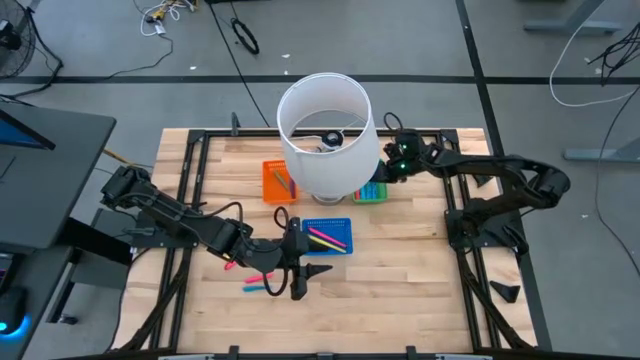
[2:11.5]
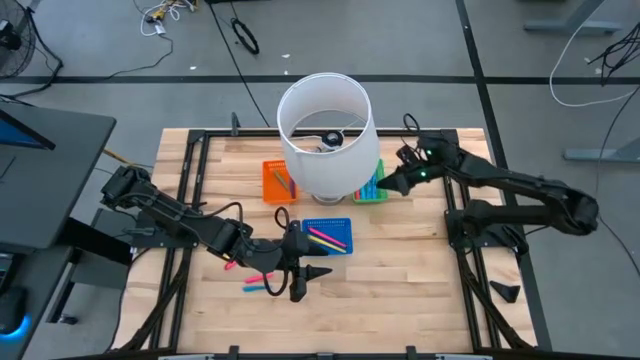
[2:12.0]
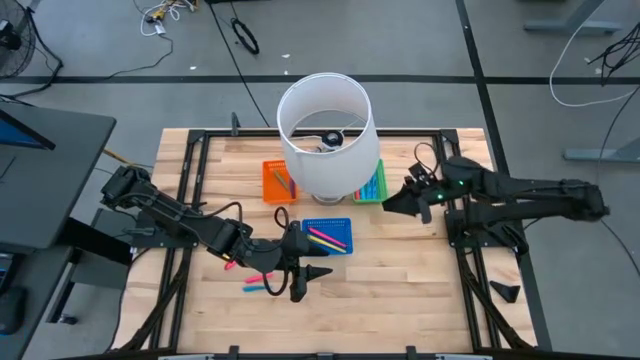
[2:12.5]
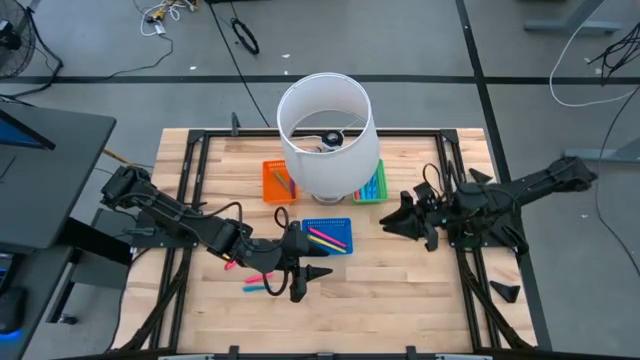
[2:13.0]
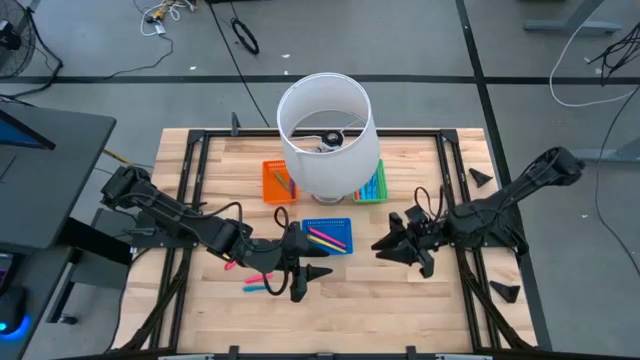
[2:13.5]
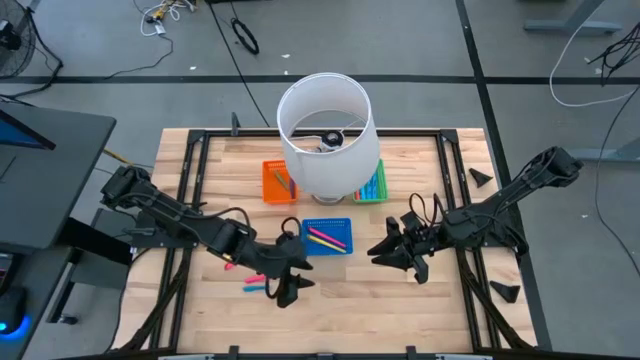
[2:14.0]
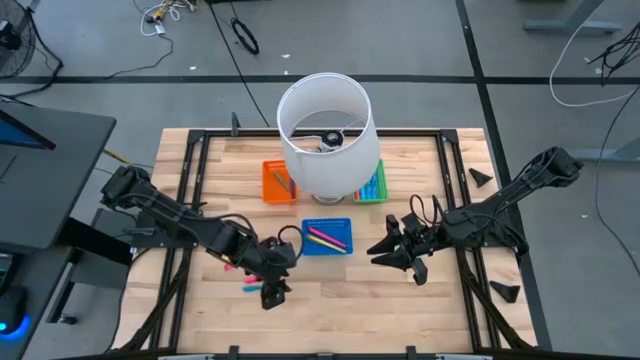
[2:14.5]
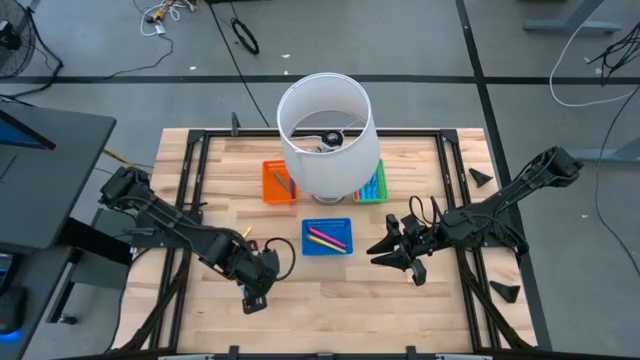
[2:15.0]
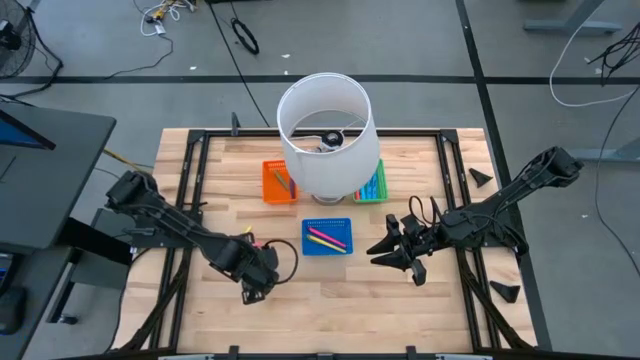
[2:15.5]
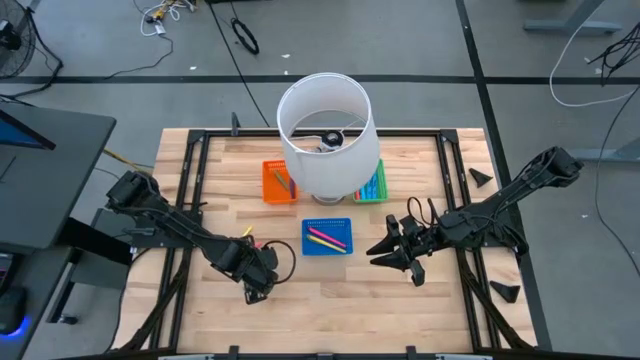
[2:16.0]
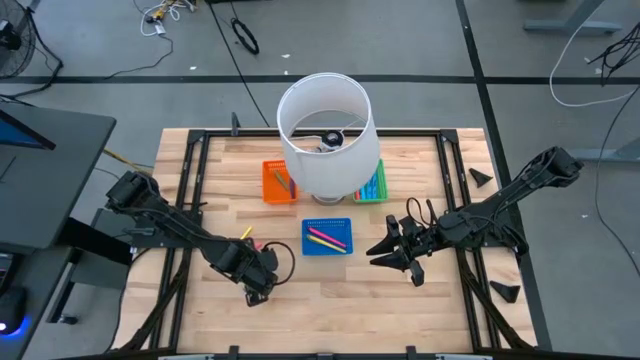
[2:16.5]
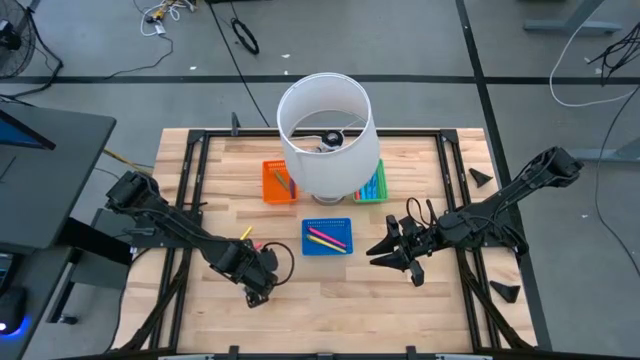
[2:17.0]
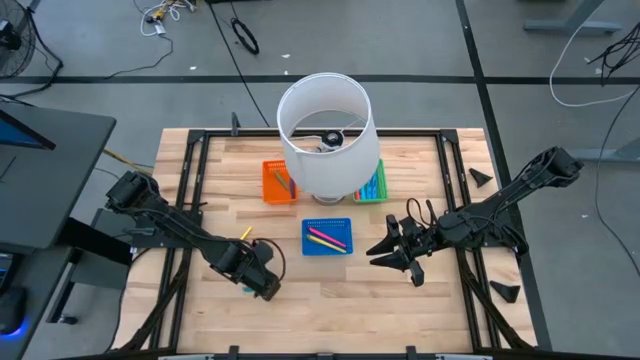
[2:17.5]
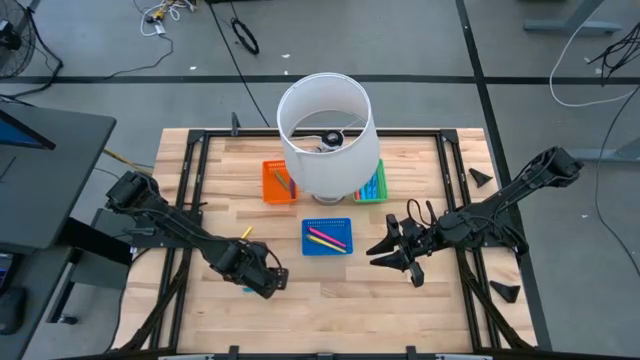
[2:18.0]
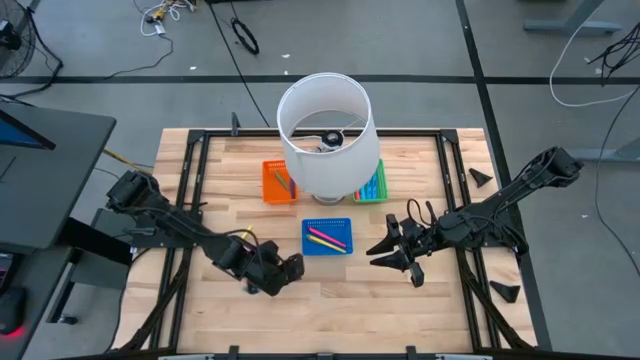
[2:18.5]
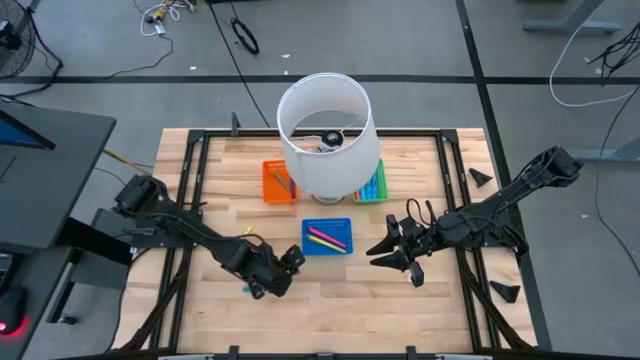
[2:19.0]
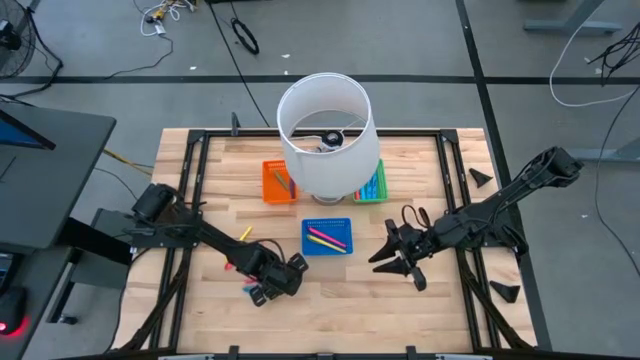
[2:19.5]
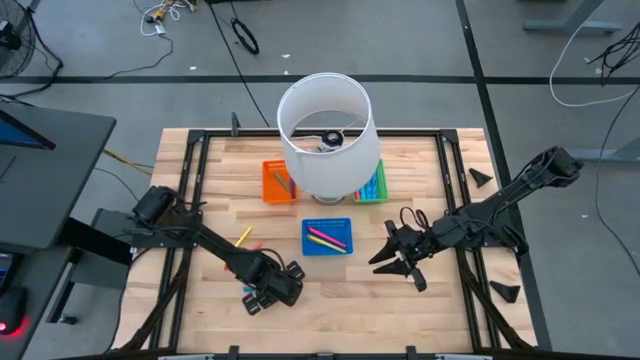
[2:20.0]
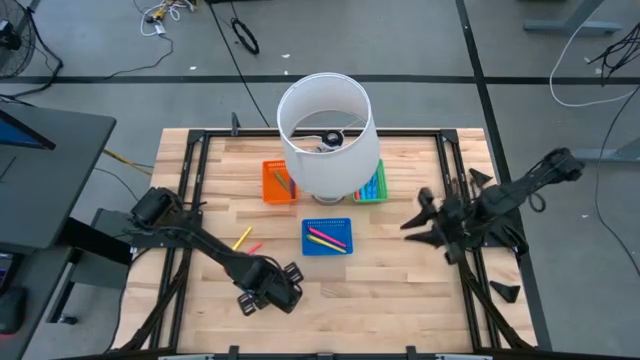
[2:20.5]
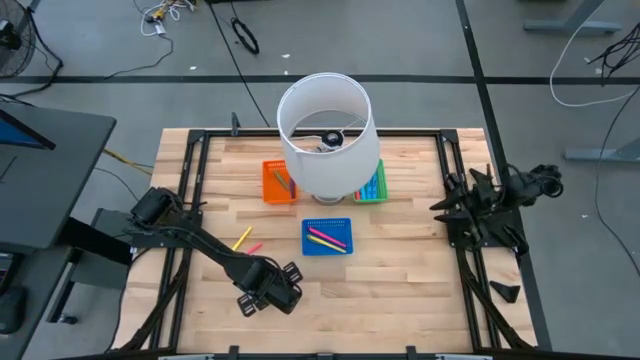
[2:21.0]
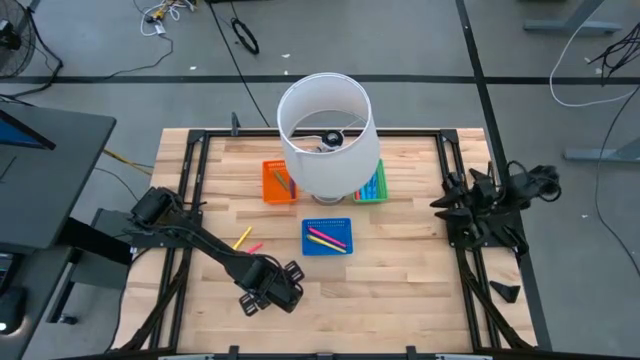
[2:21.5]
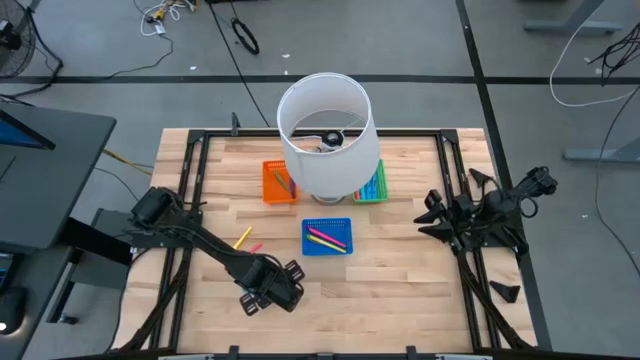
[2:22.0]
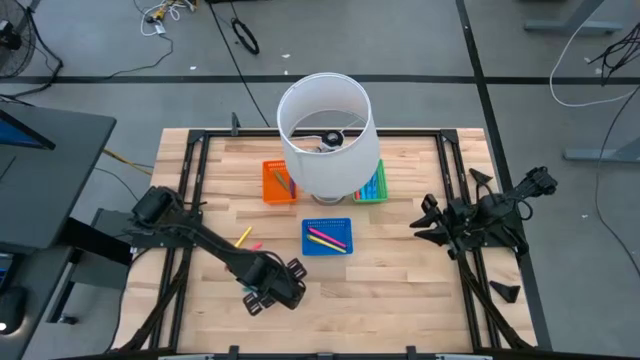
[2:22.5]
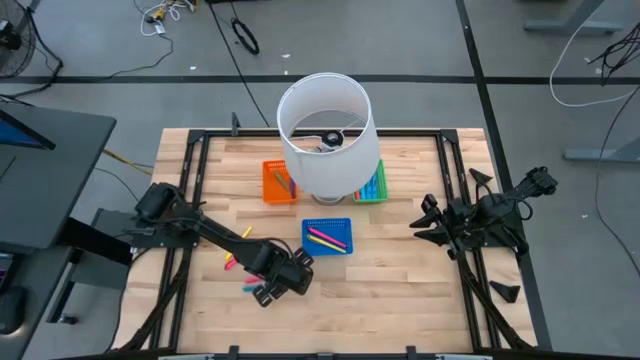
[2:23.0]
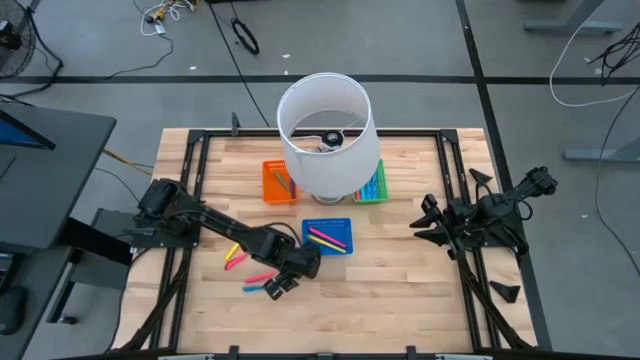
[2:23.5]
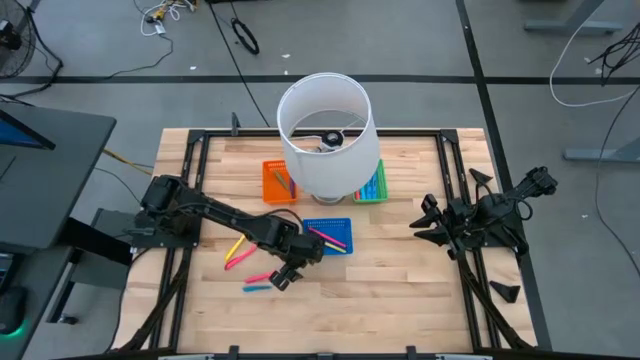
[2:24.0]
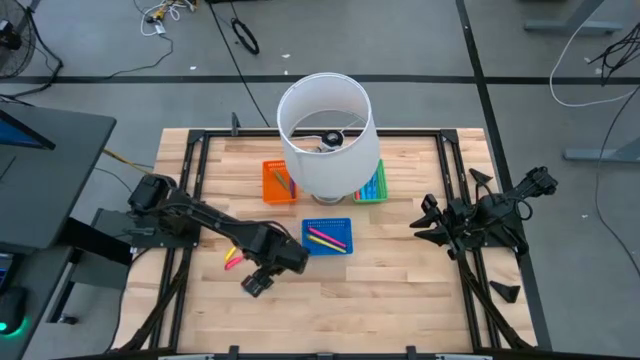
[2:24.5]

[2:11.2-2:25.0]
Task: Pick & Place Markers
Put the pink small highlighter pen into the orange bin

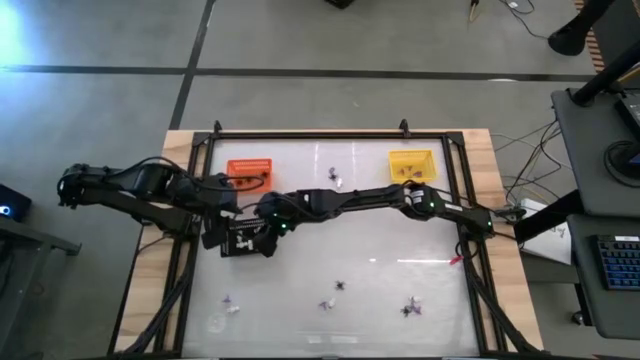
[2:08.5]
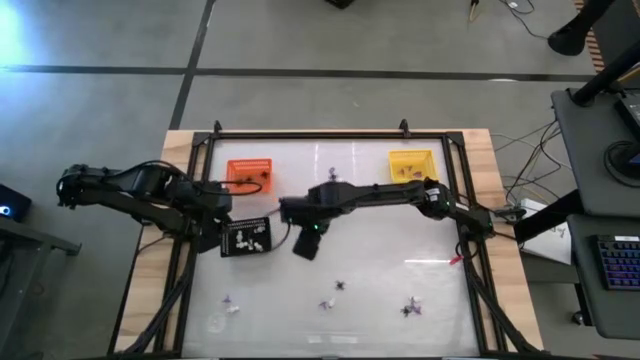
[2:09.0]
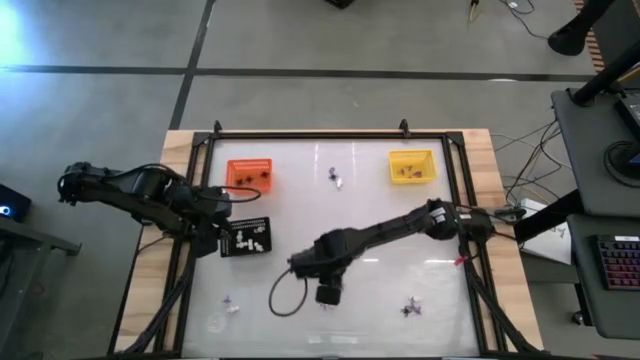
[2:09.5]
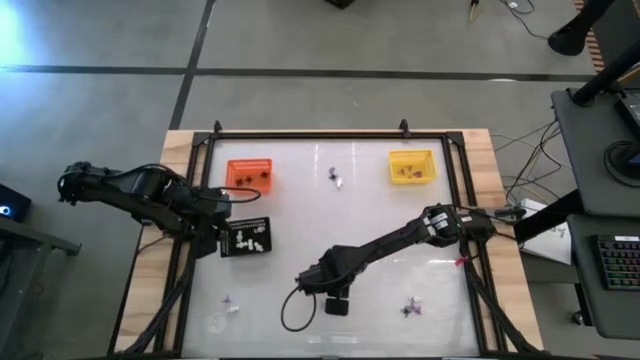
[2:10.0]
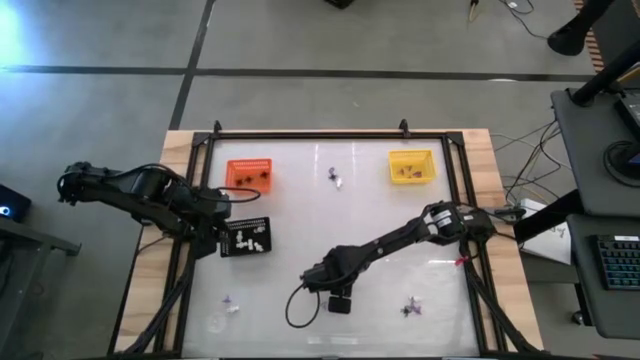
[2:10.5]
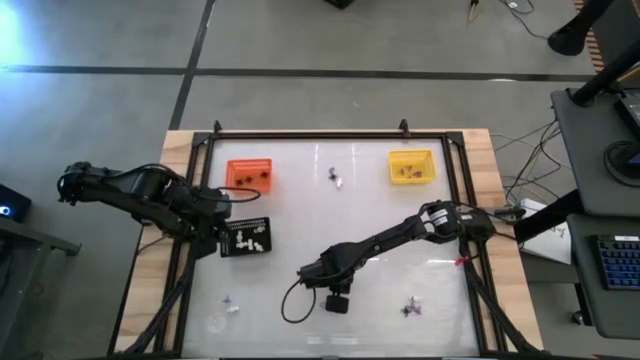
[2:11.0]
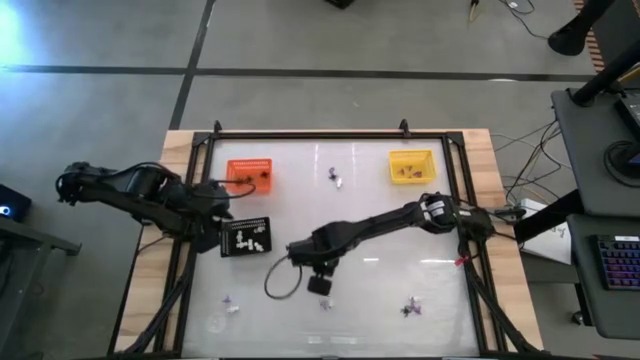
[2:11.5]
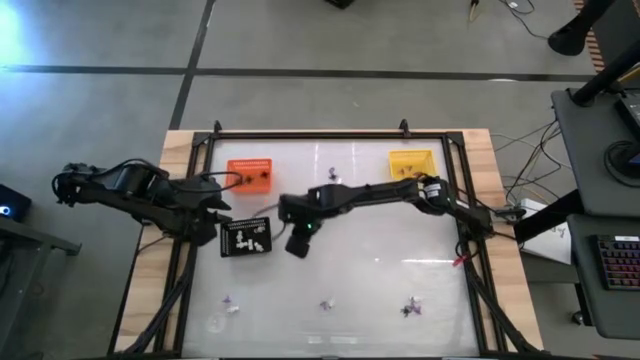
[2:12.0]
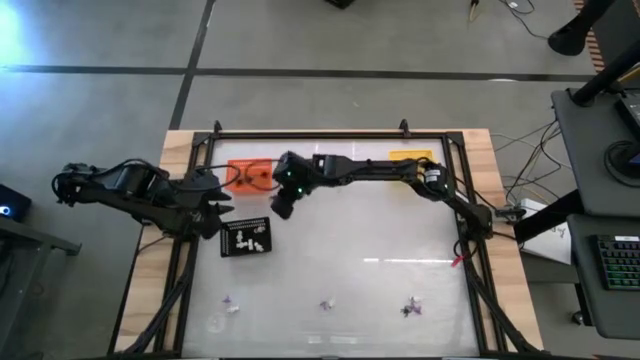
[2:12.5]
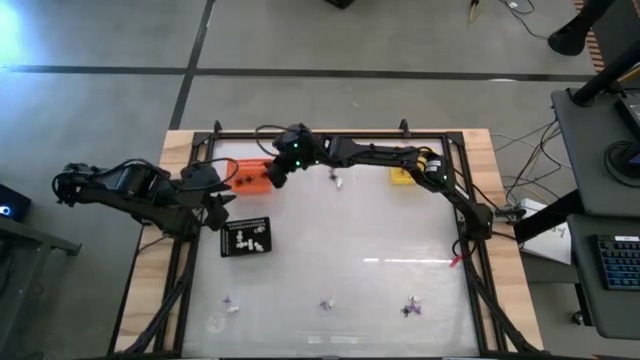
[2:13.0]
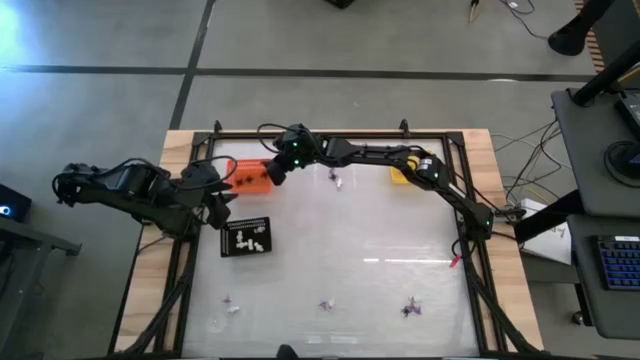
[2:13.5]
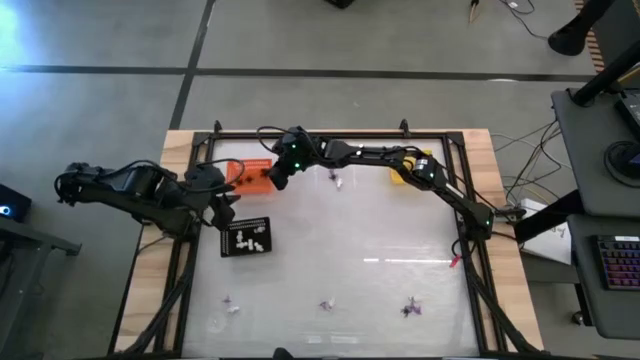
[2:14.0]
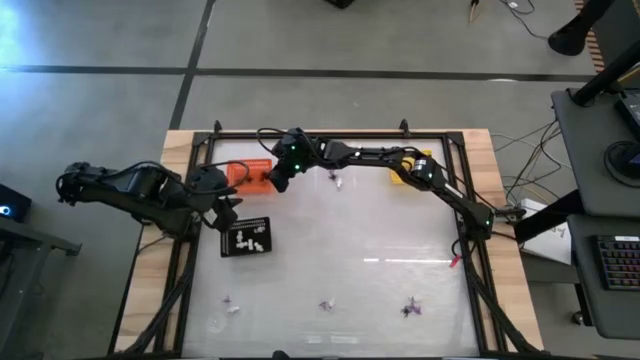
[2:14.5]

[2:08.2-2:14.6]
Task: Sort Halloween decoration
Put the black spider toy into the orange bin
